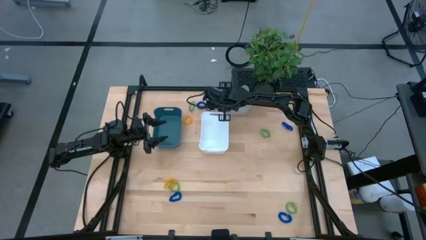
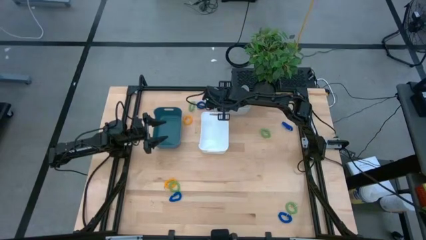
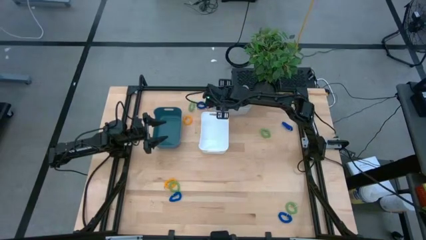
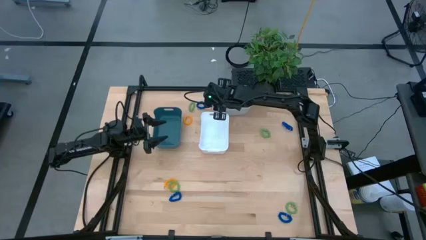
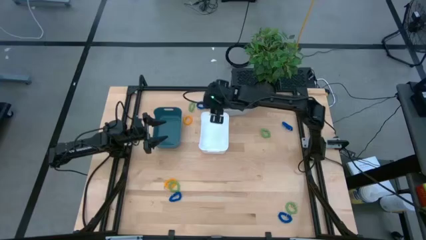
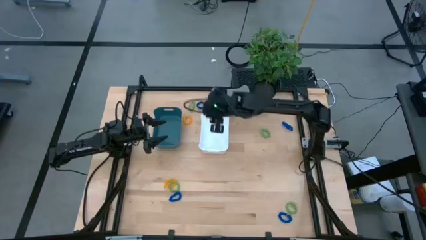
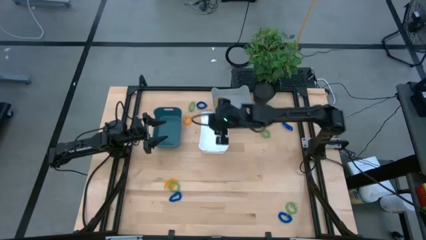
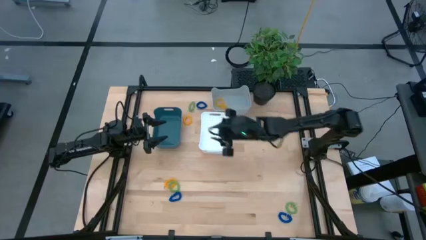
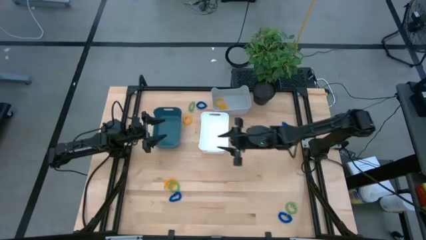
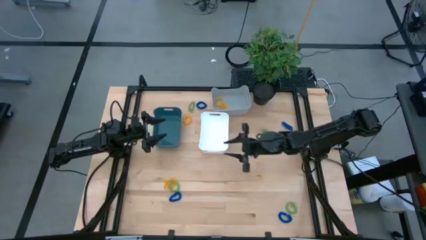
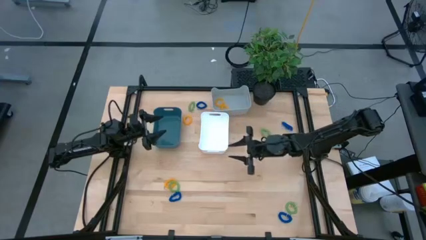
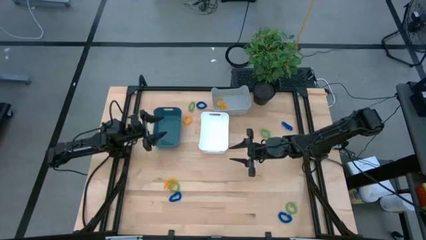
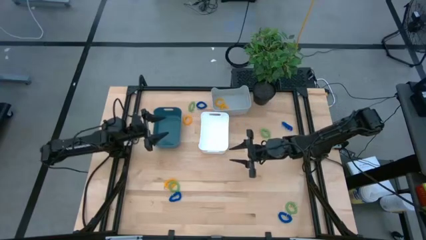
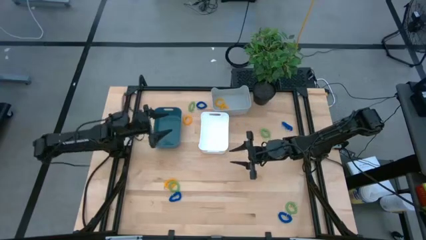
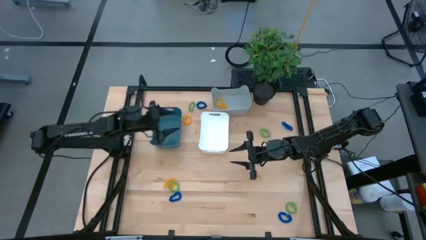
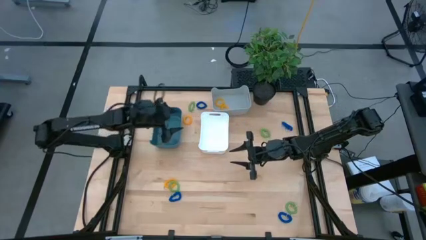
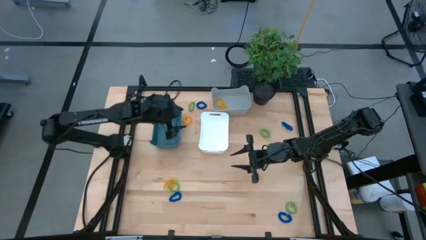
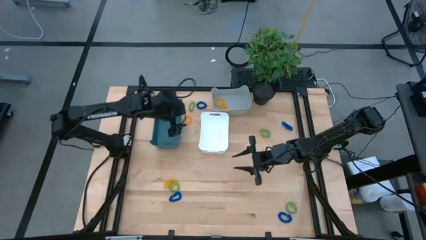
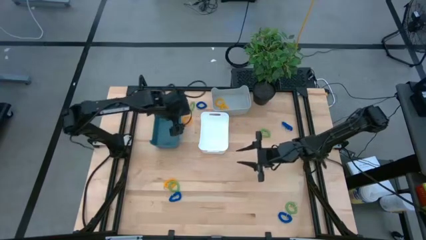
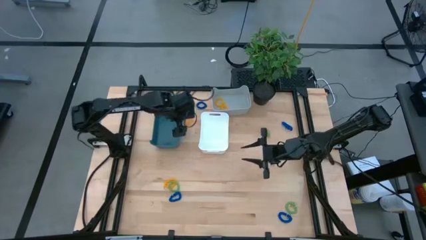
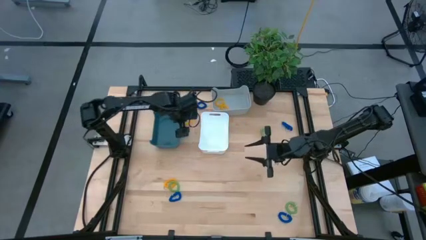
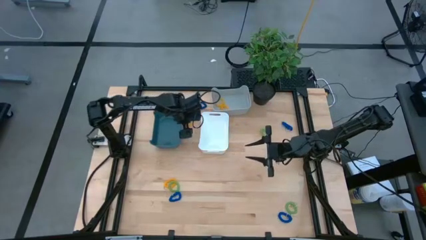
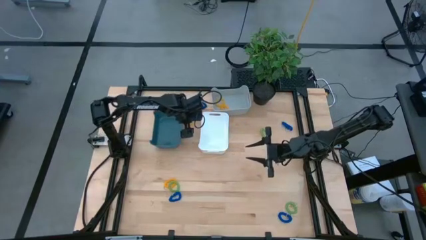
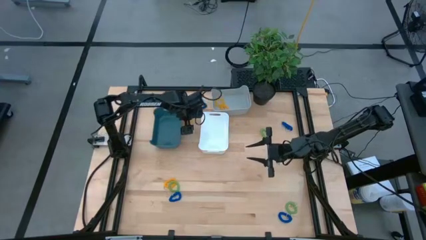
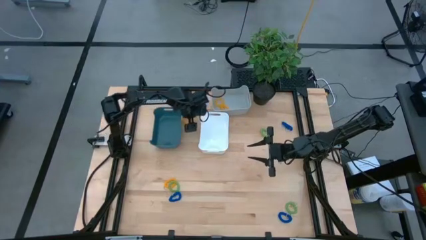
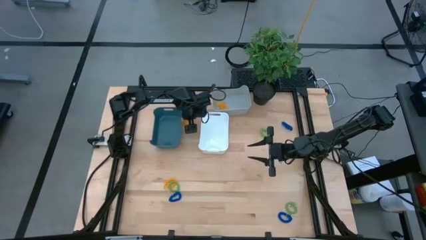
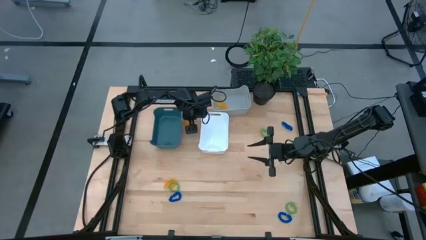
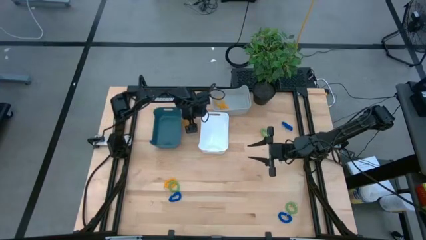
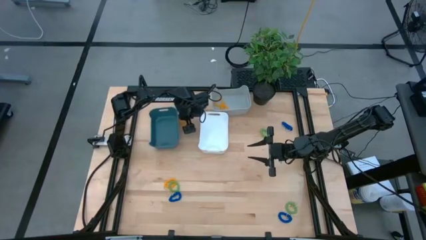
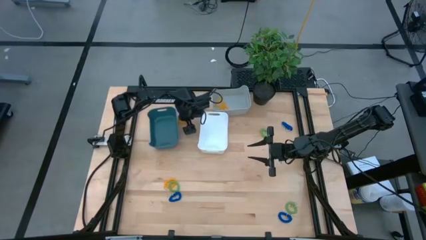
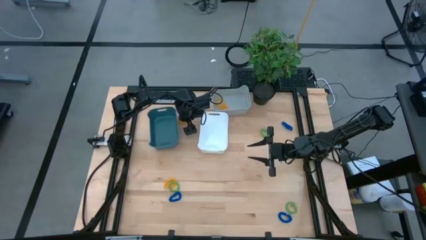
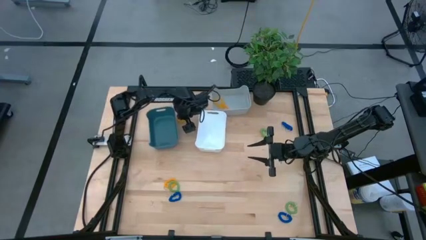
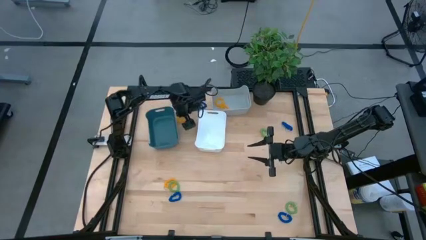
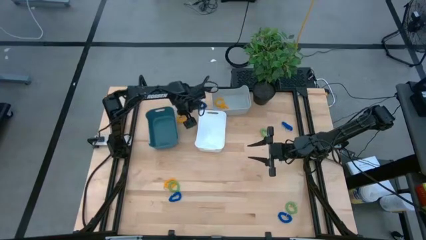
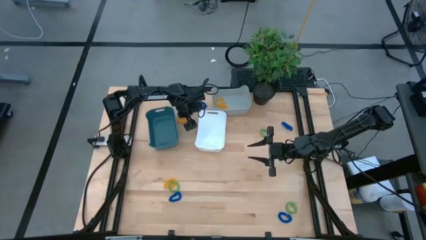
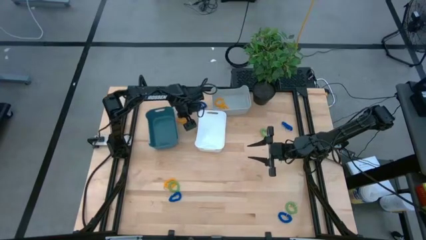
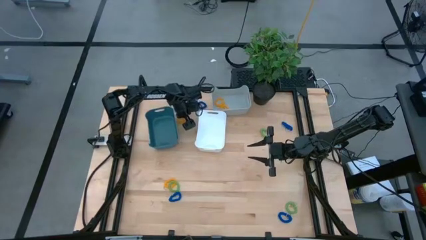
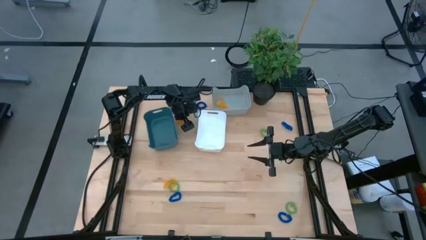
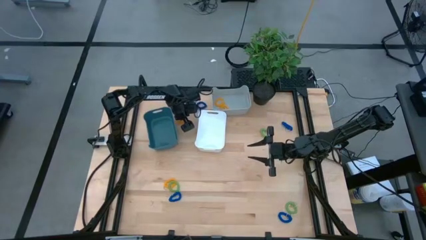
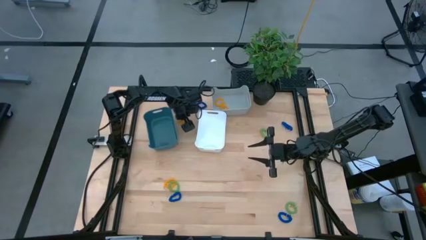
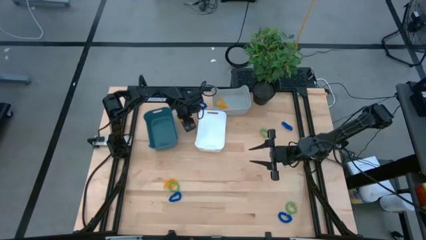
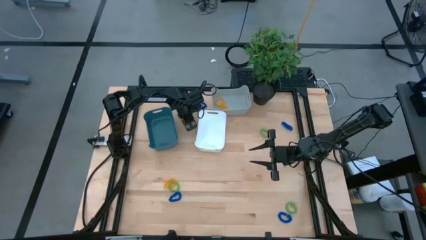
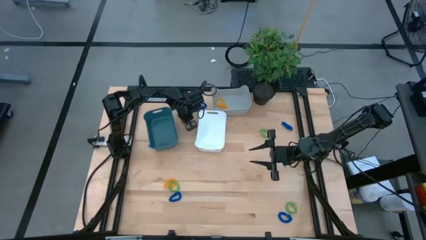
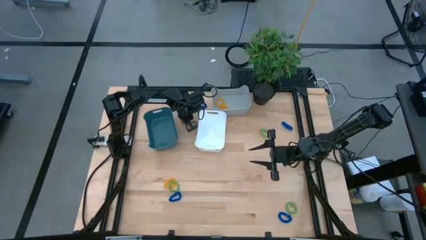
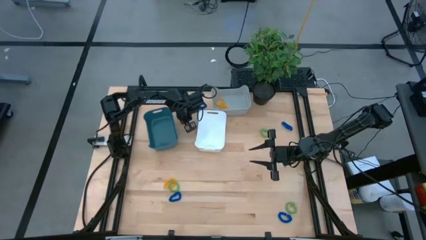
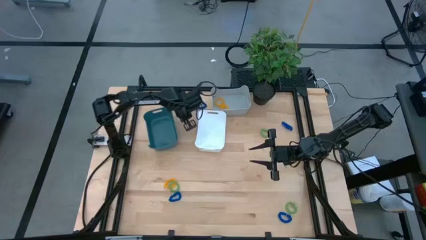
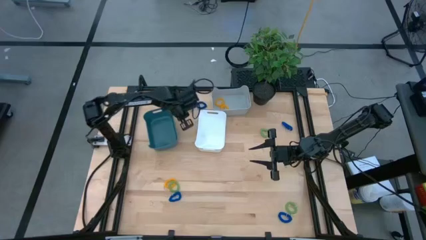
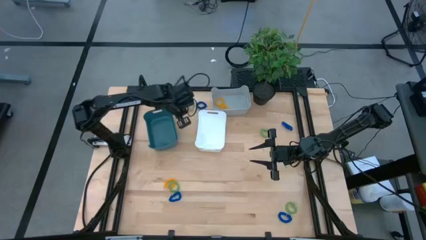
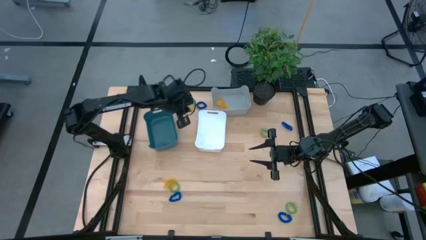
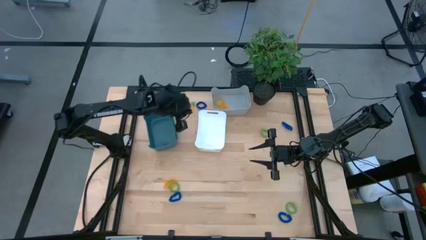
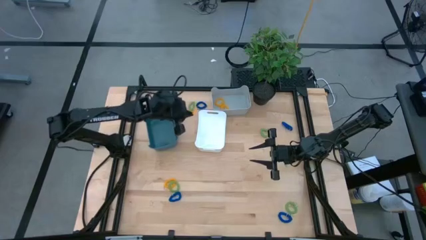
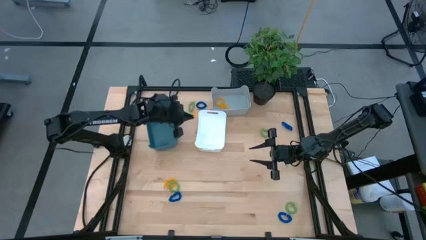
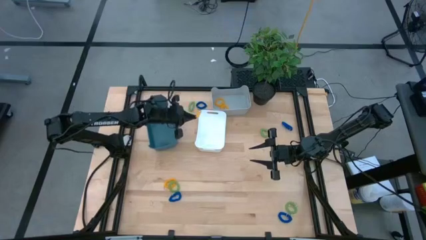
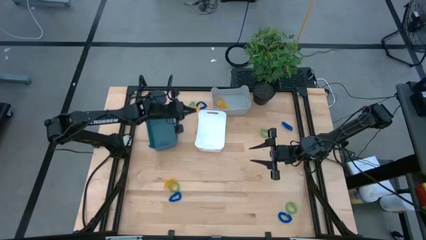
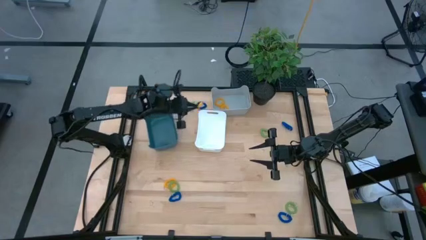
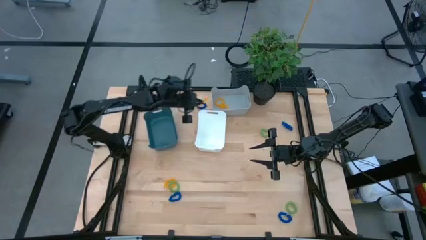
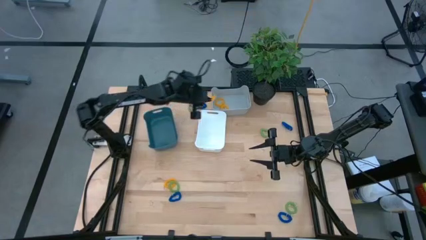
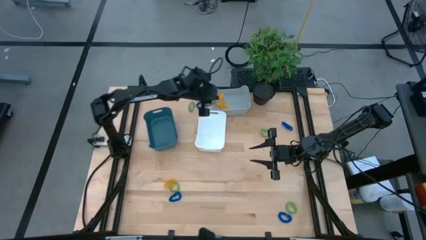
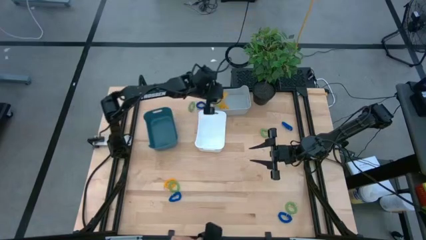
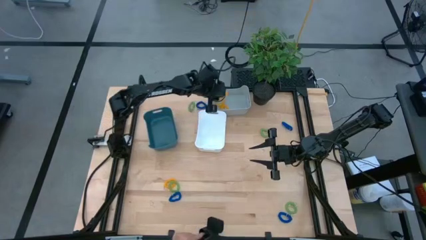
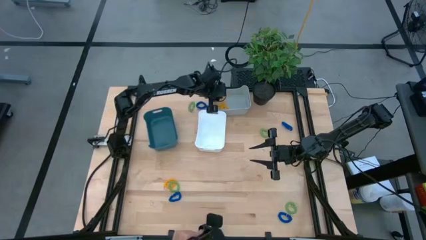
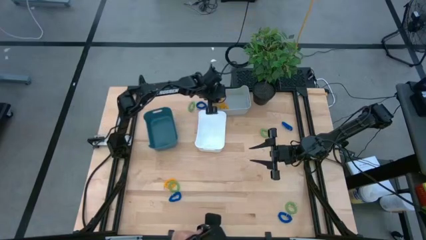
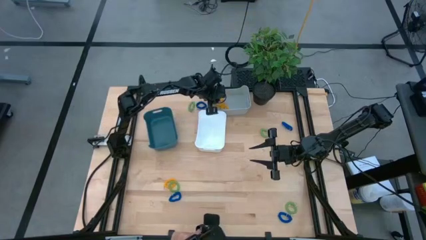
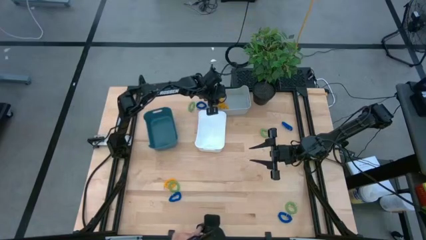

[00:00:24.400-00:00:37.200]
Task: Sort spring keychains
Put the yellow spring keychain into the gray bin
